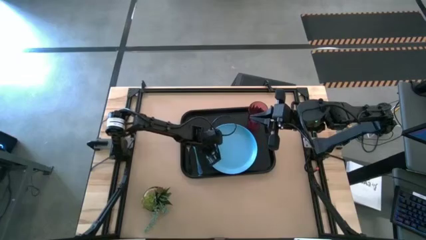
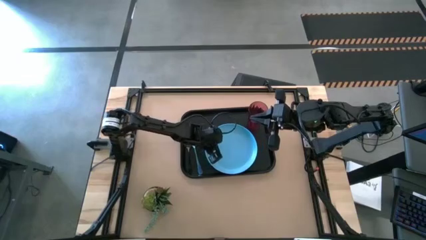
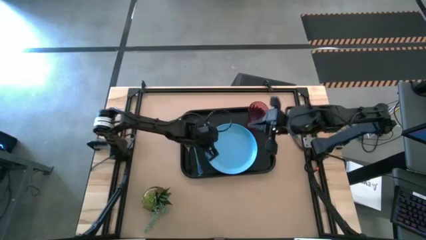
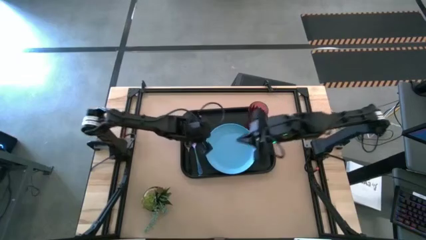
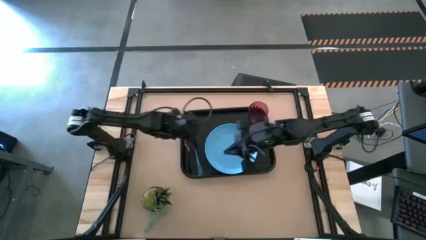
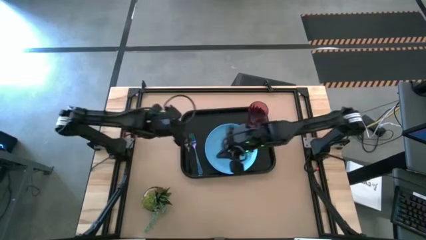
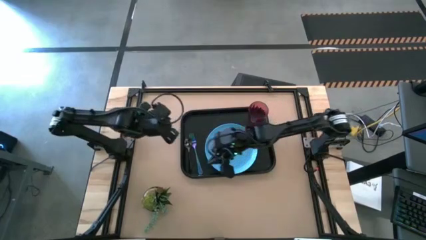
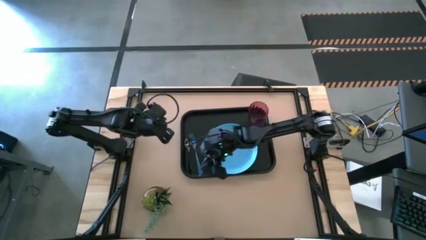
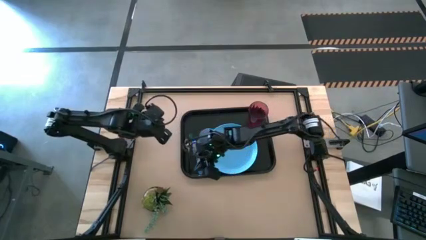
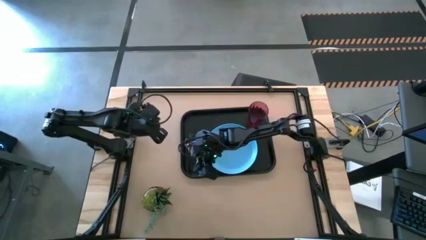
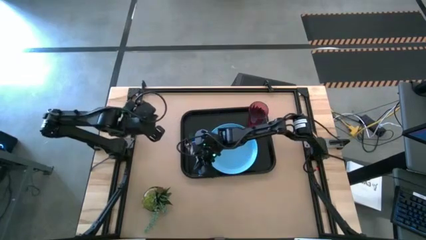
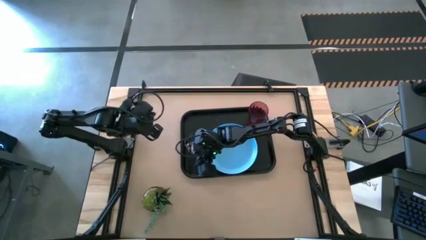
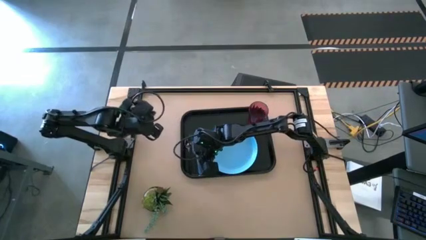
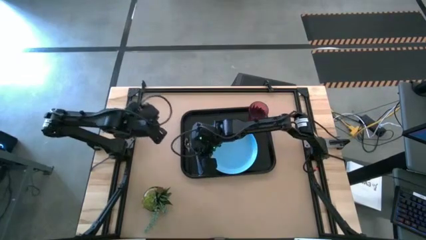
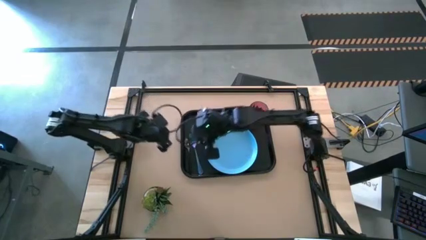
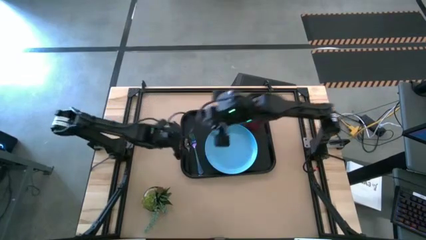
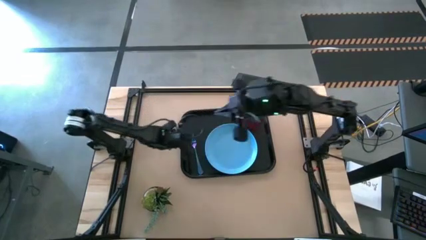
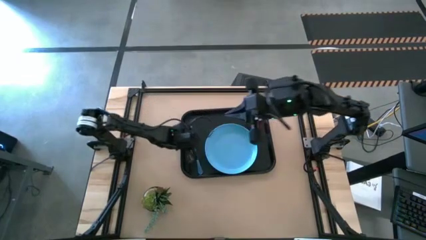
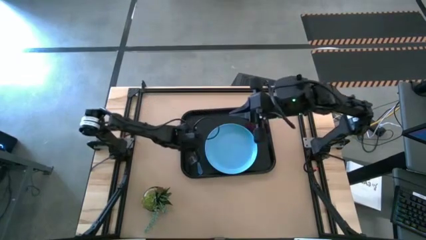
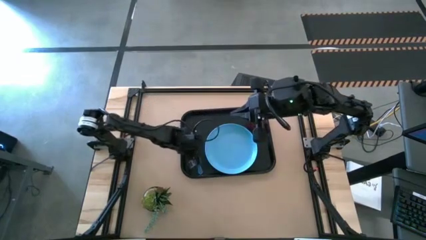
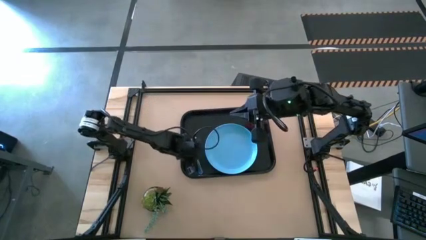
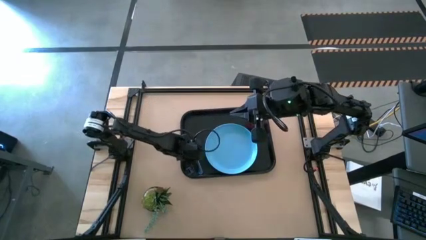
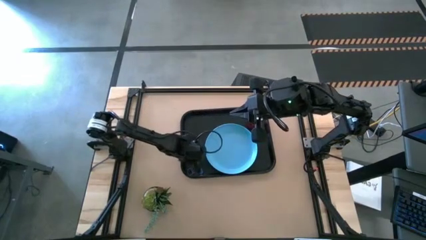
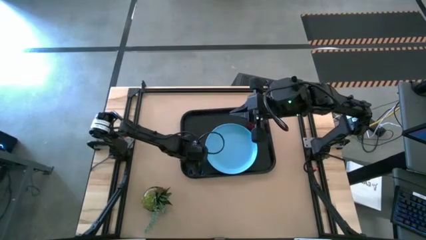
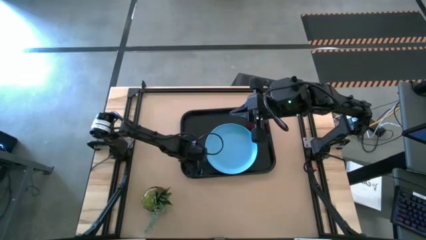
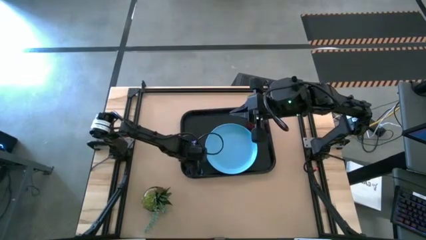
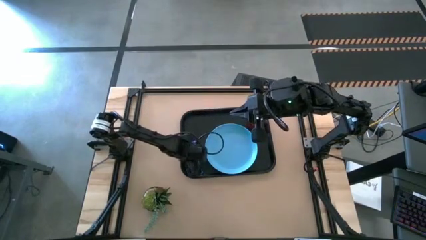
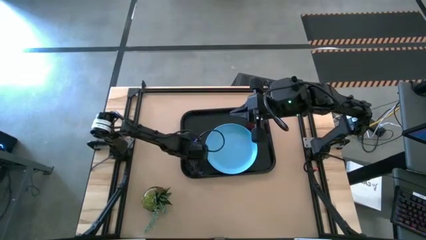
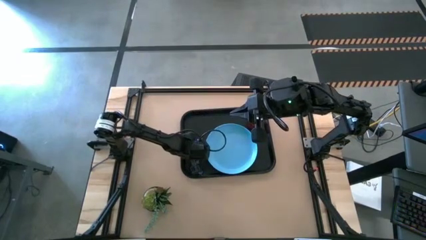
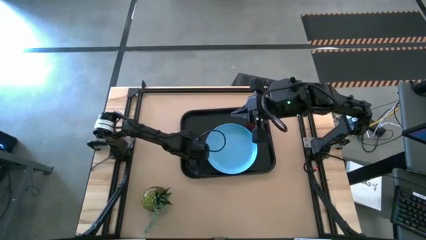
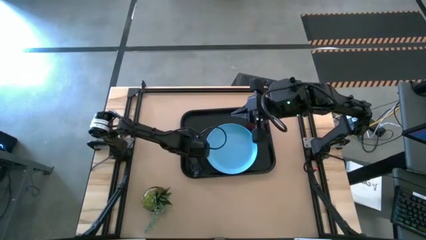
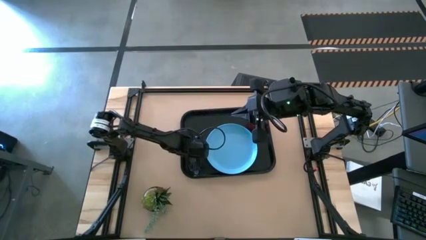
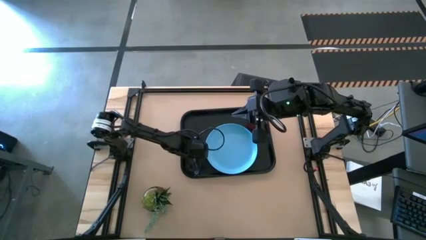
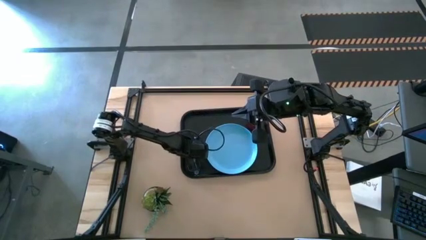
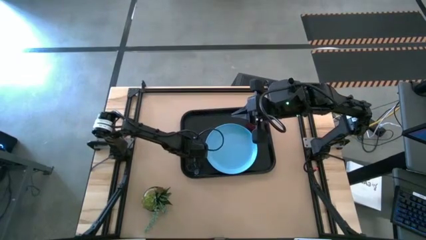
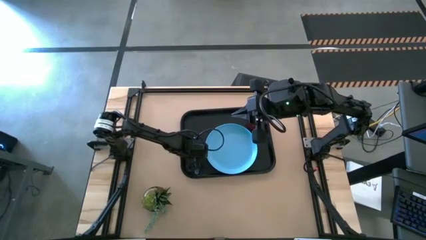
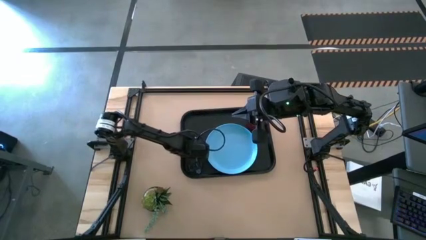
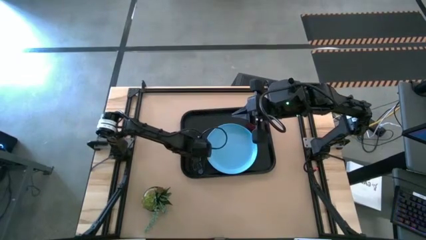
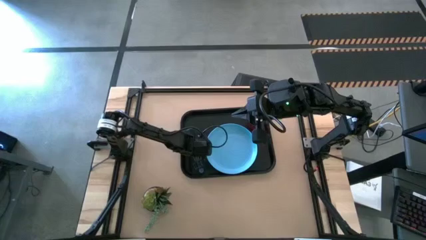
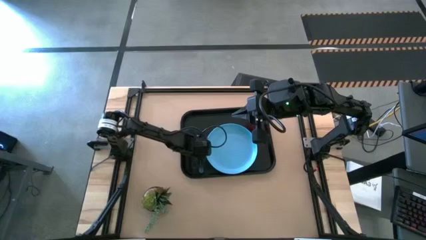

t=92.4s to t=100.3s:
Task: Pick and place plate/cup/fork/spoon on tray
Adjust the blue fork

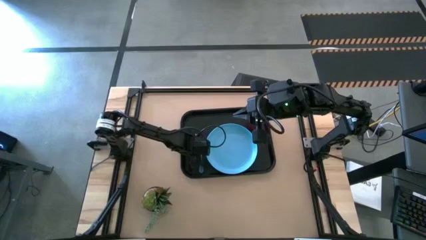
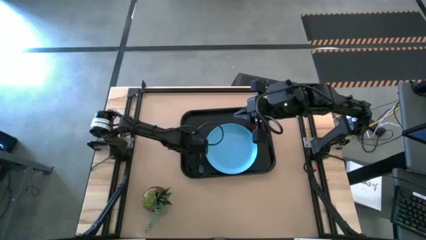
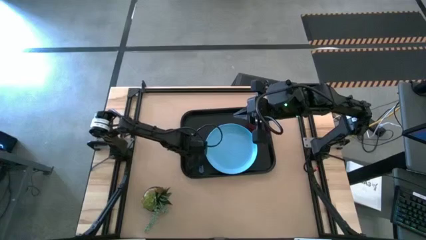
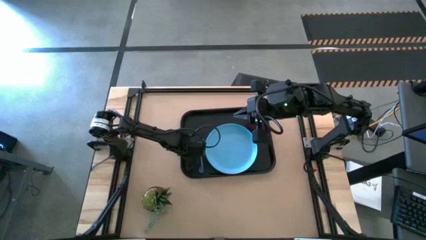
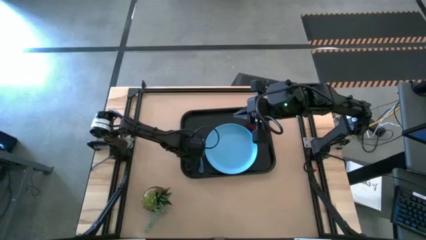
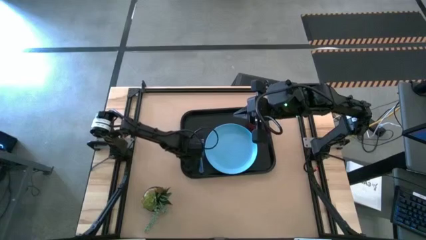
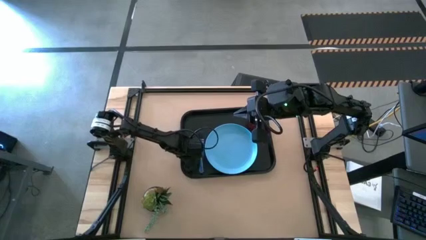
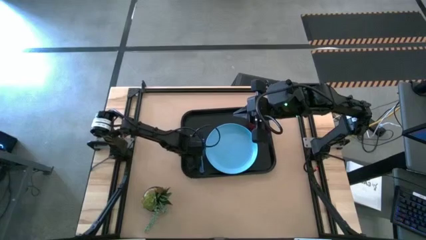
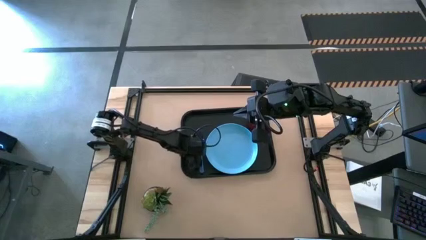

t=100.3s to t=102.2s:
Adjust the black spoon

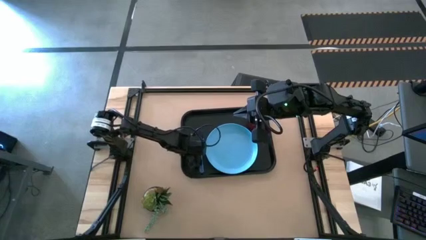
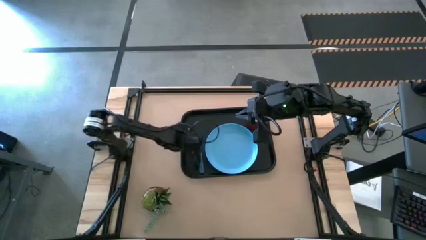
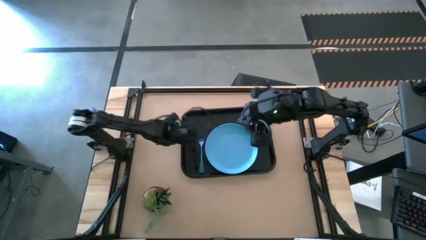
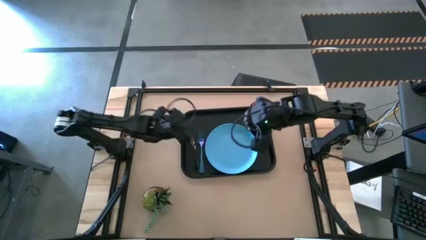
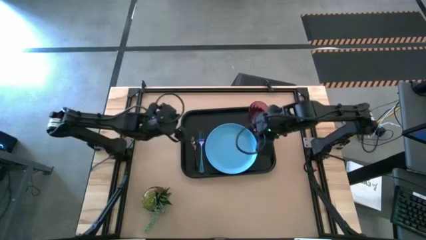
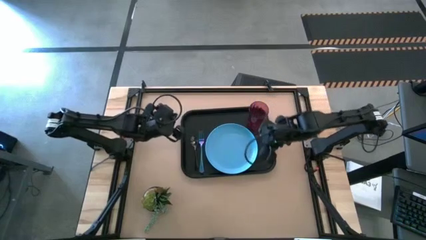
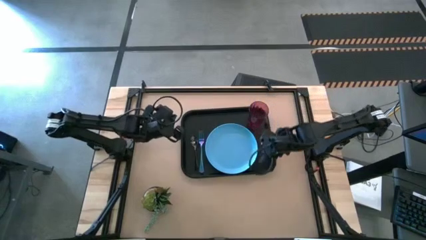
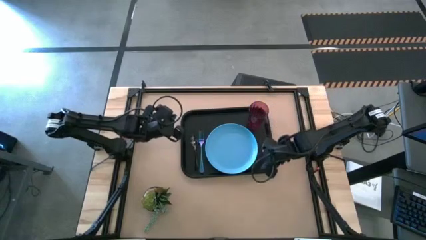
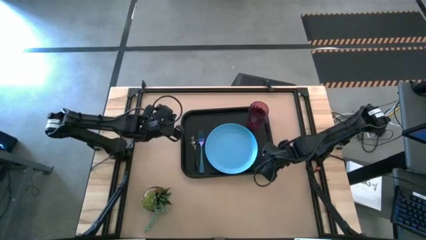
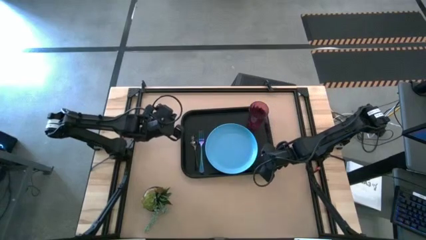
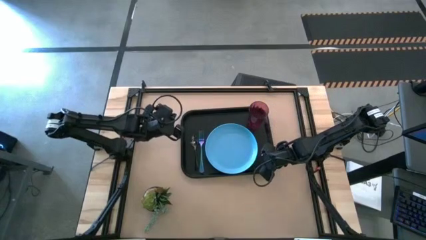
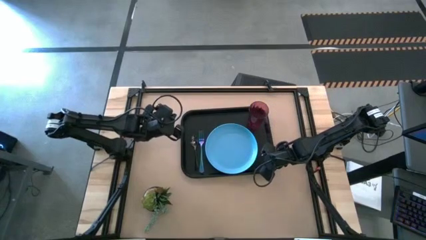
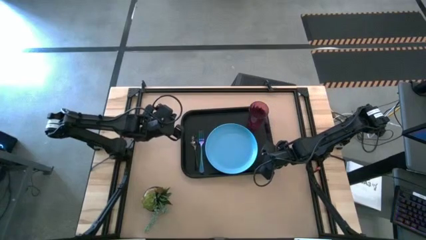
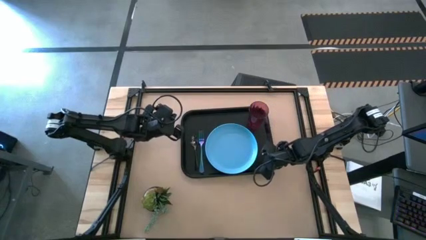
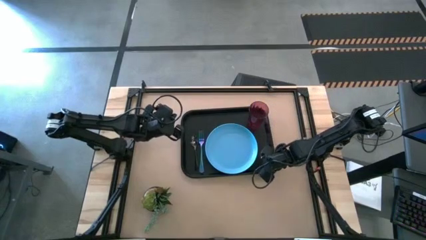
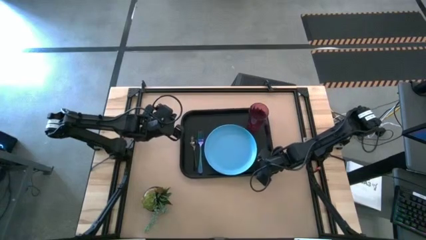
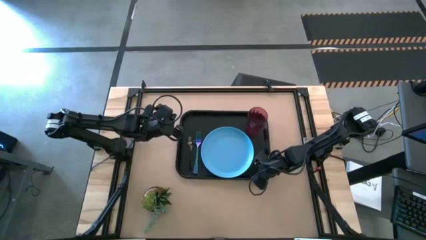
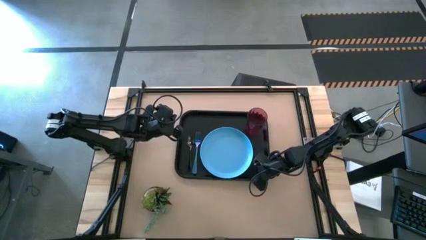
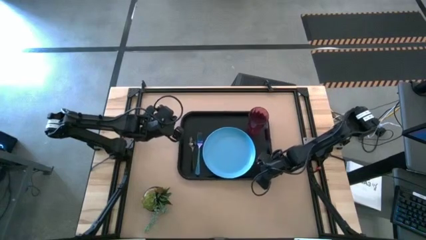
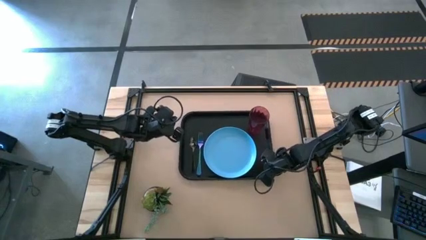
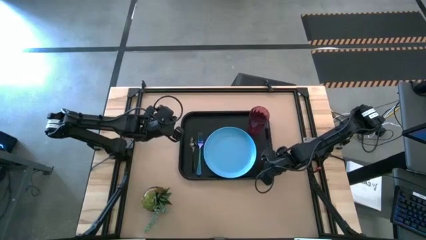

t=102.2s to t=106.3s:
Adjust the black tray
